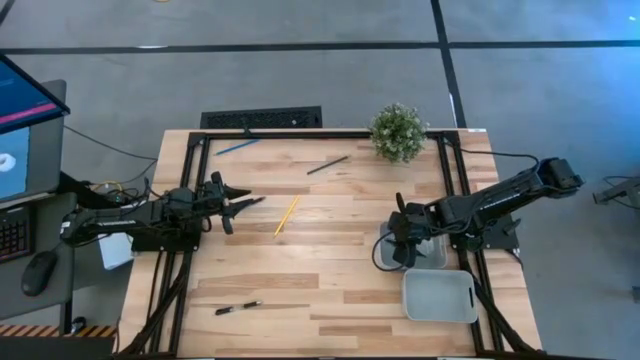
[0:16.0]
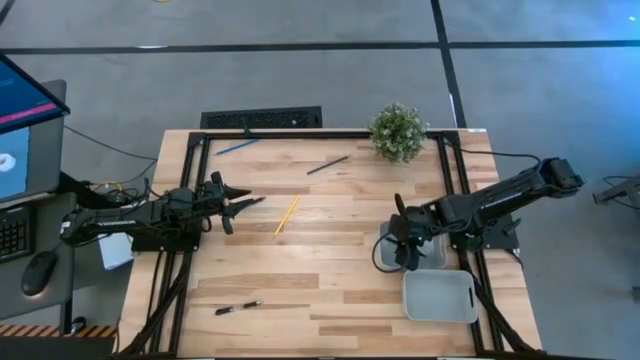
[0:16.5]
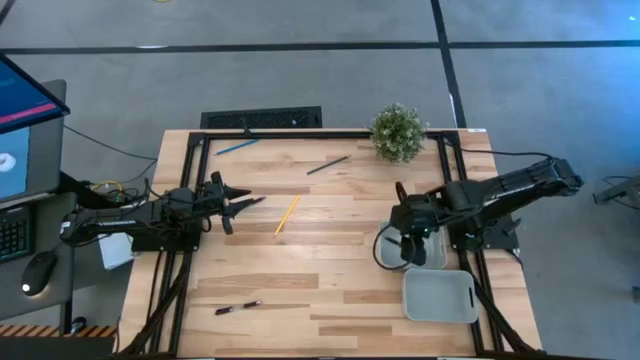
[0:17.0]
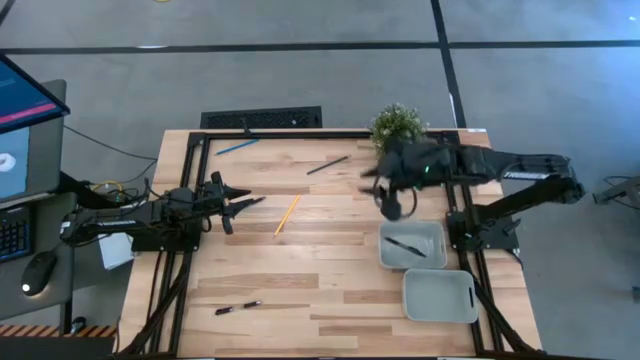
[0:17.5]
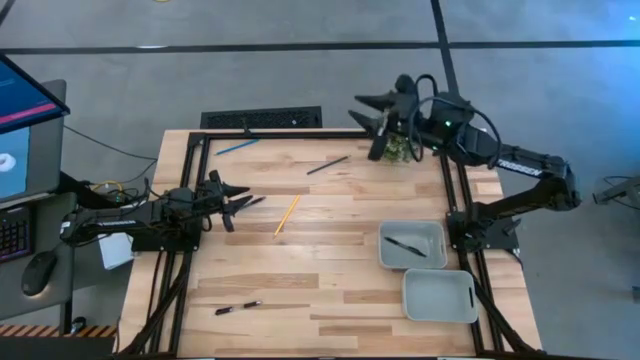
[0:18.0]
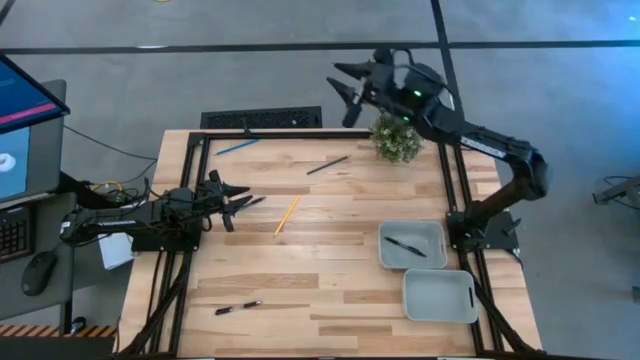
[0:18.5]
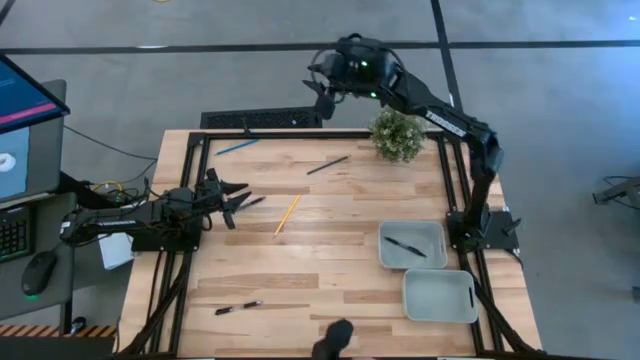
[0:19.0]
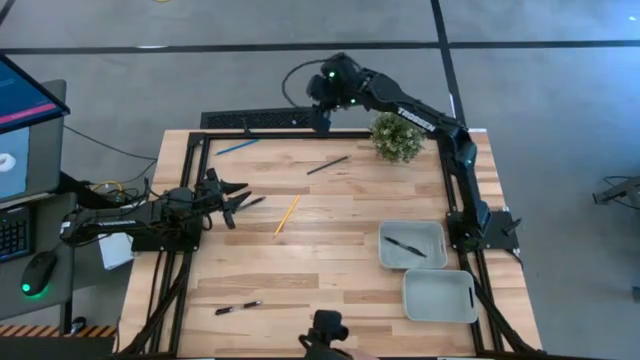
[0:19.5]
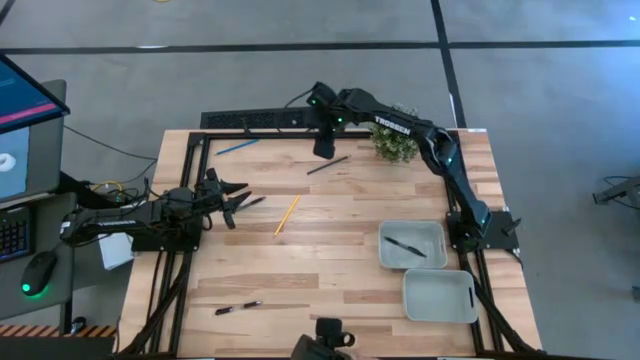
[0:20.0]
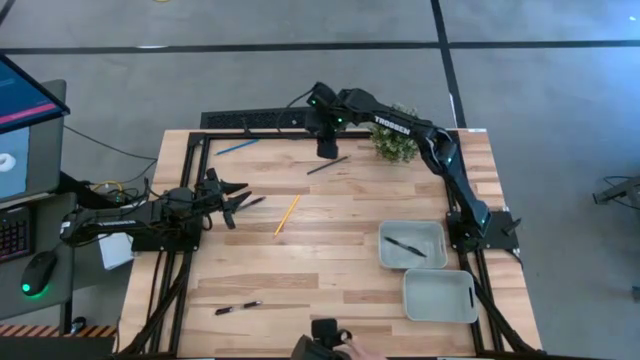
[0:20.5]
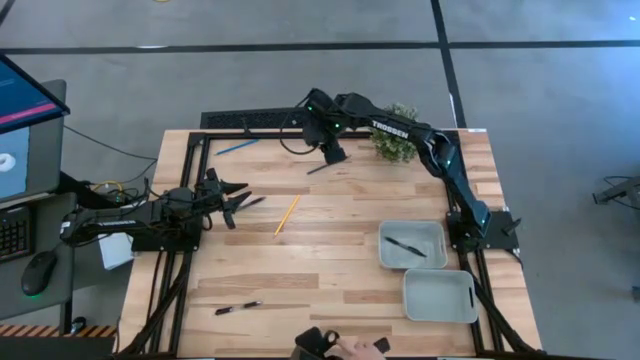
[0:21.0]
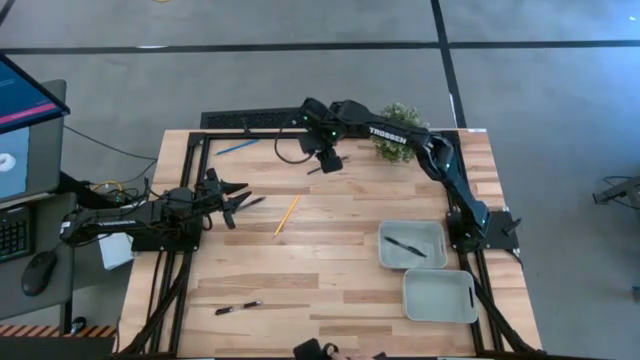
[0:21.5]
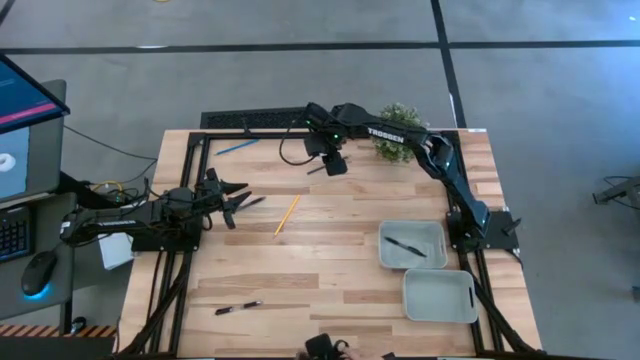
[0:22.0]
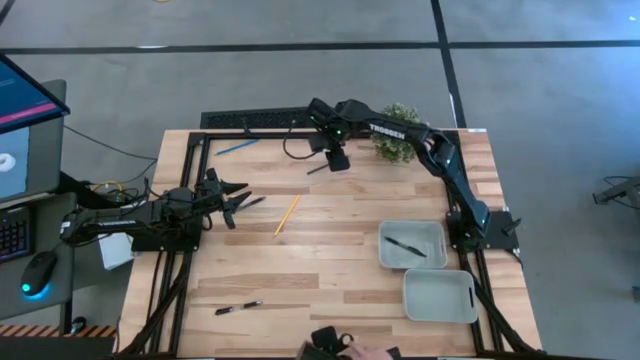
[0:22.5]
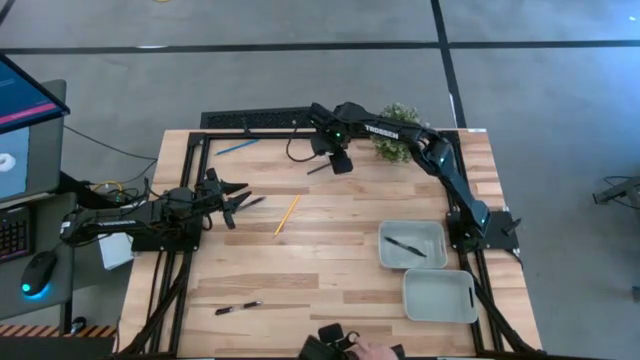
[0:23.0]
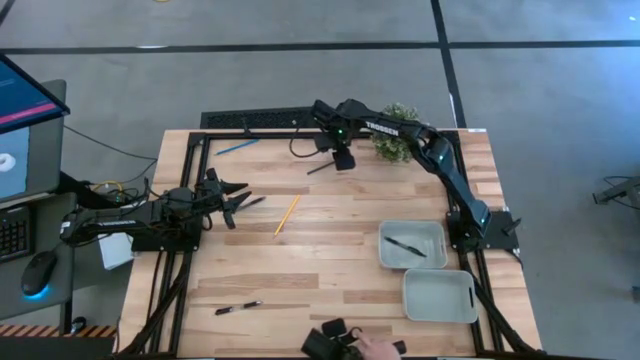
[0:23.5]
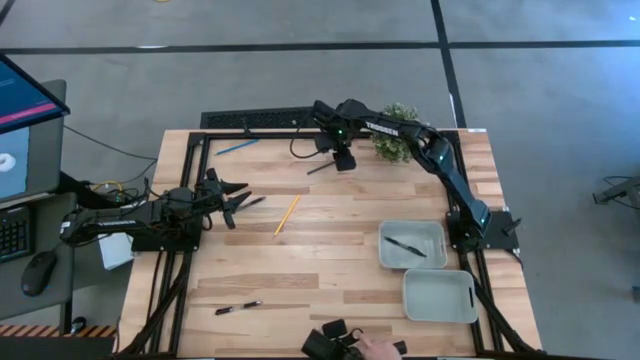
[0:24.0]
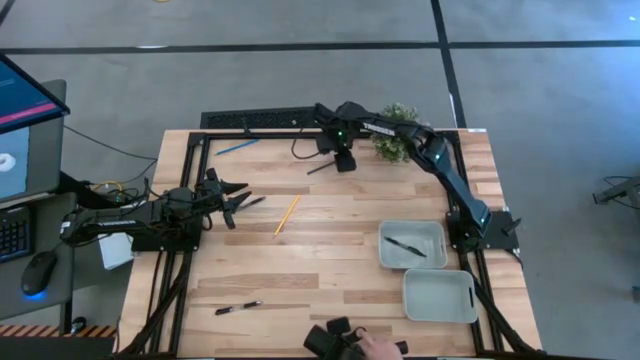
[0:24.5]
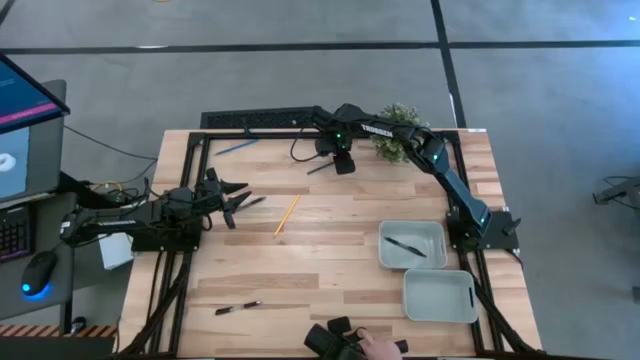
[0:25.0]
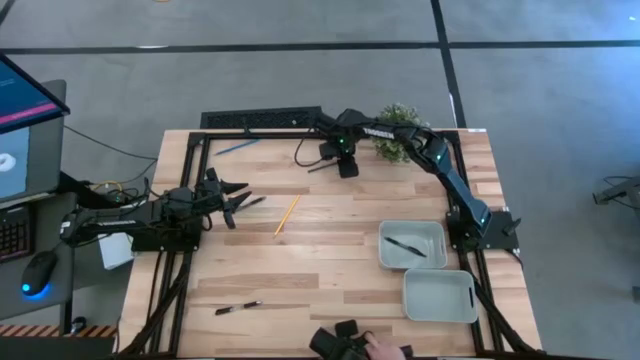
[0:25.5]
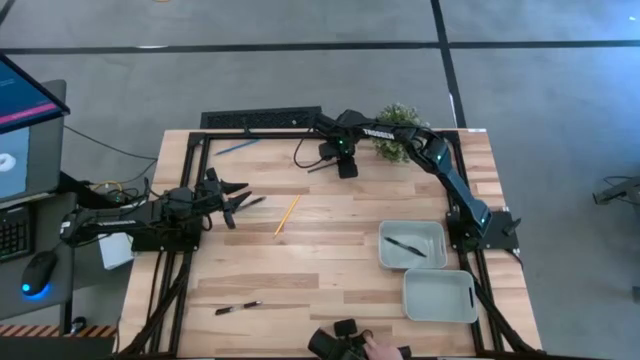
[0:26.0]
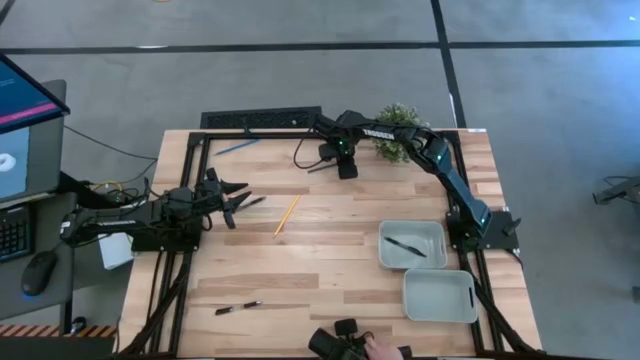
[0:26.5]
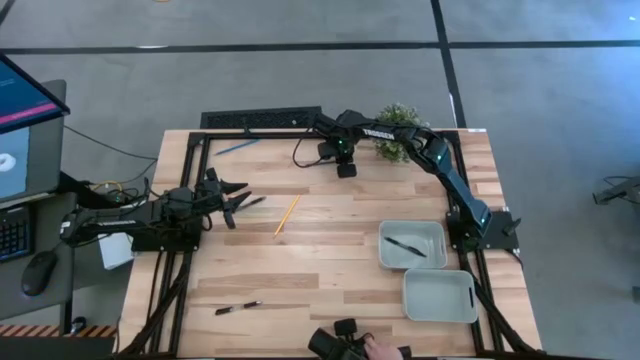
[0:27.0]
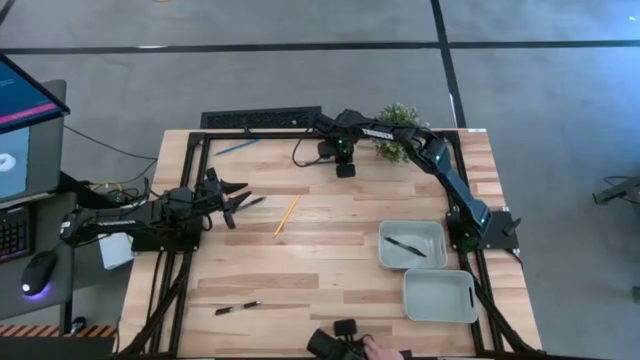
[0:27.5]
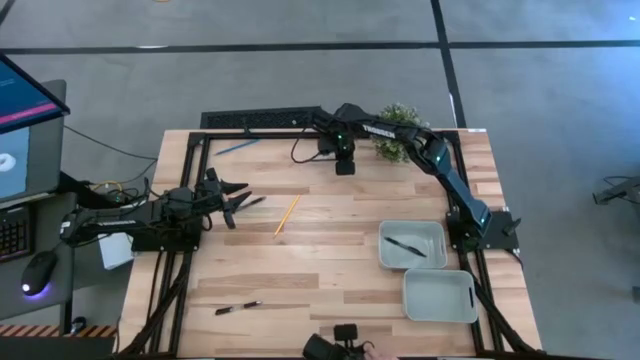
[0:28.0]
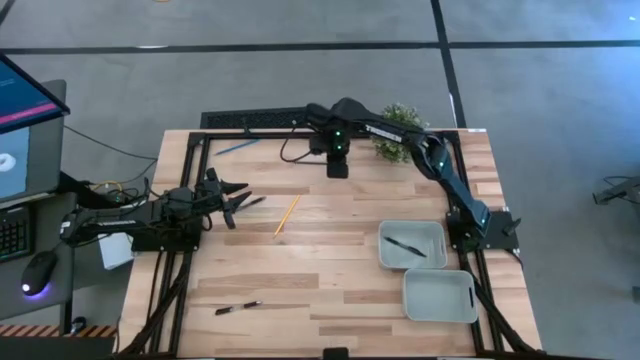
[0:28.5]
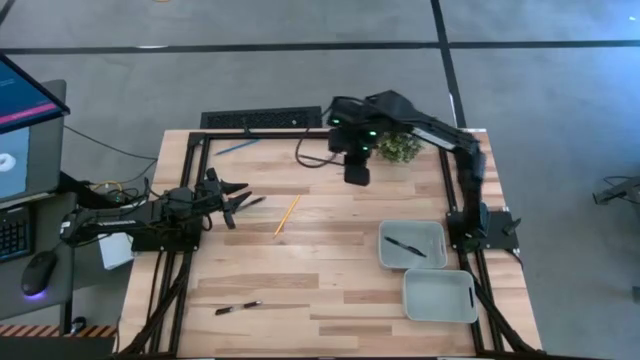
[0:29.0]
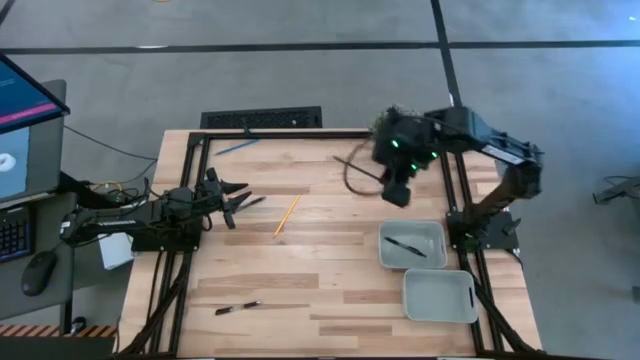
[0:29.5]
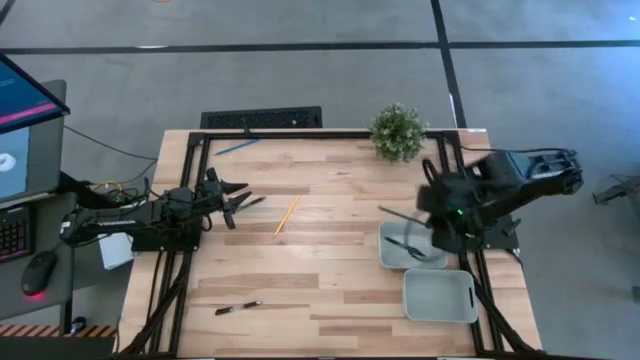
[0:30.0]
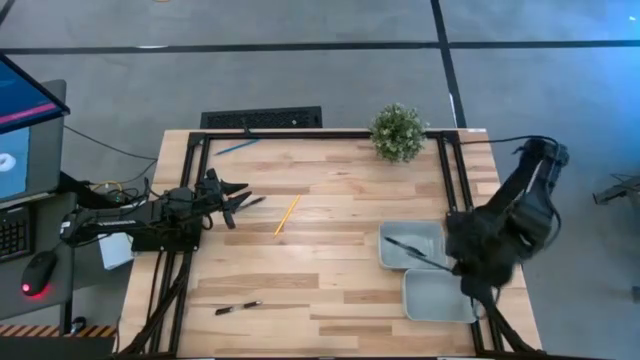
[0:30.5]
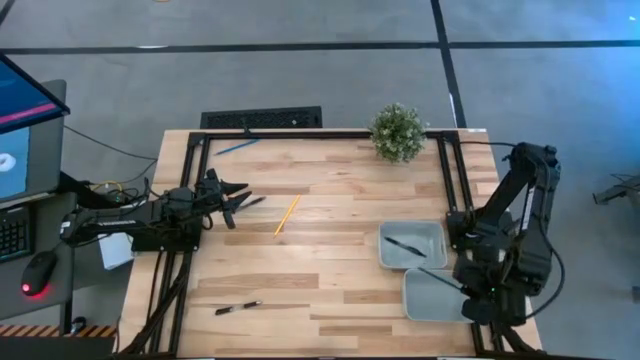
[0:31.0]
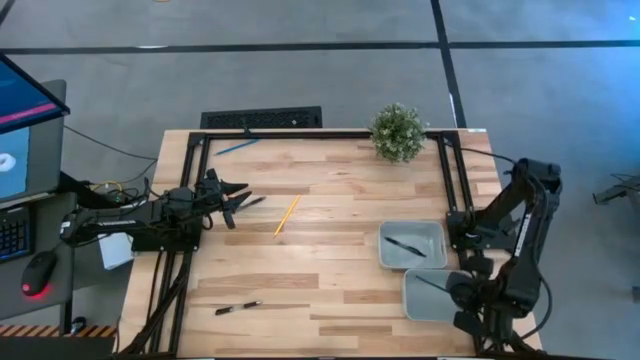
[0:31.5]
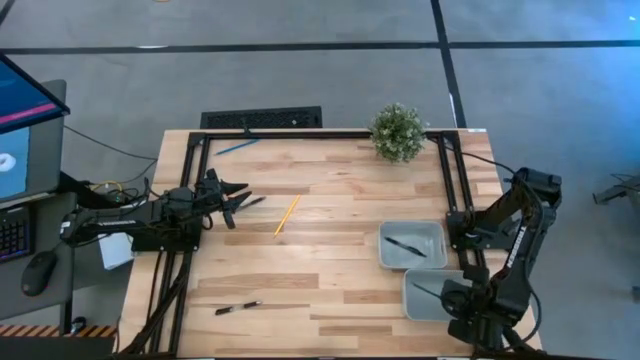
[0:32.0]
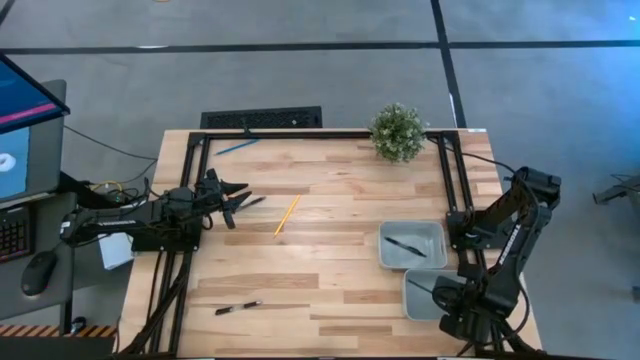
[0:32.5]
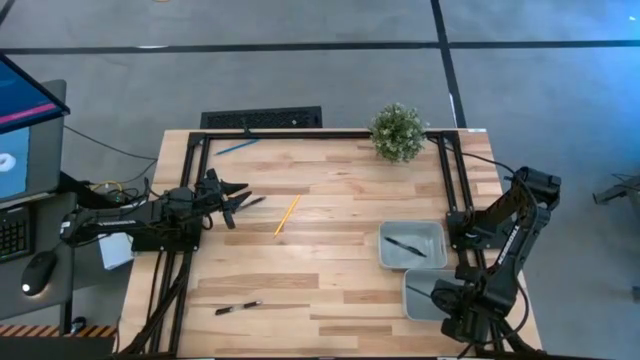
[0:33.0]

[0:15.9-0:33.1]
Task: Sort pens & pencils
Put the green pencil into the bottom gray bin

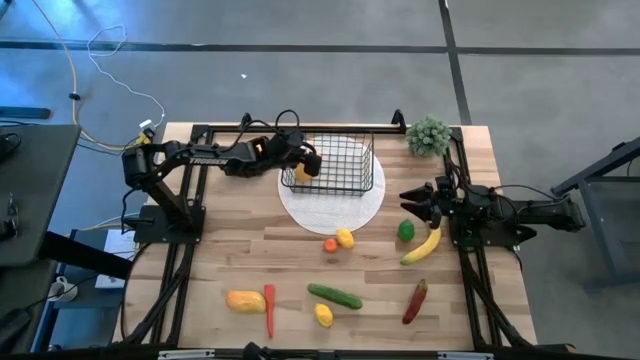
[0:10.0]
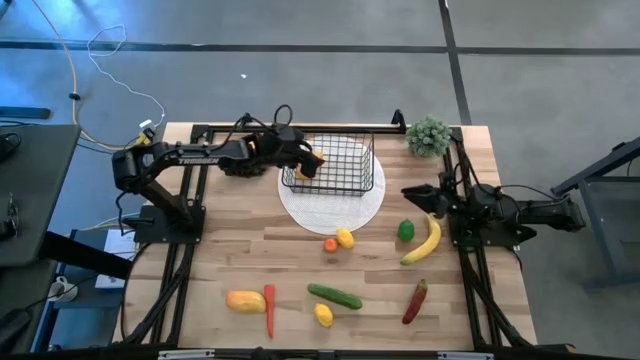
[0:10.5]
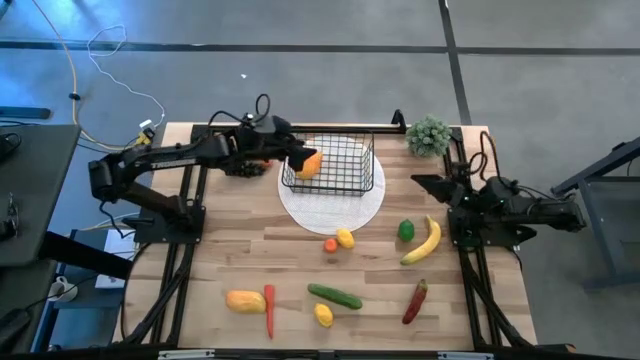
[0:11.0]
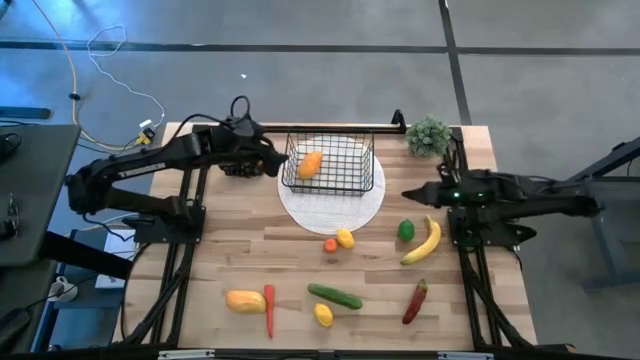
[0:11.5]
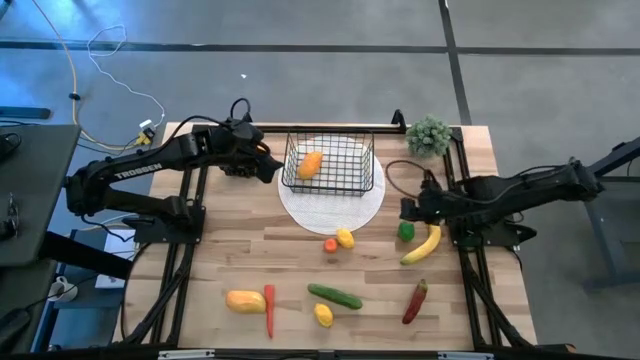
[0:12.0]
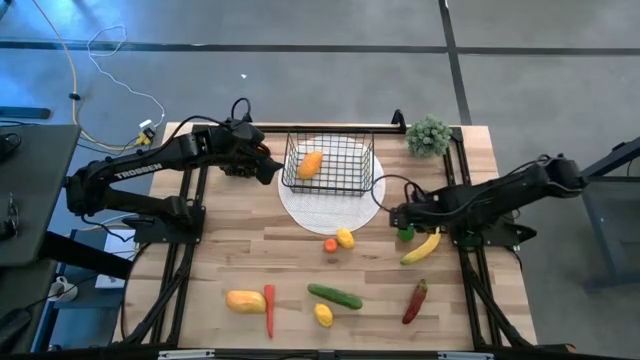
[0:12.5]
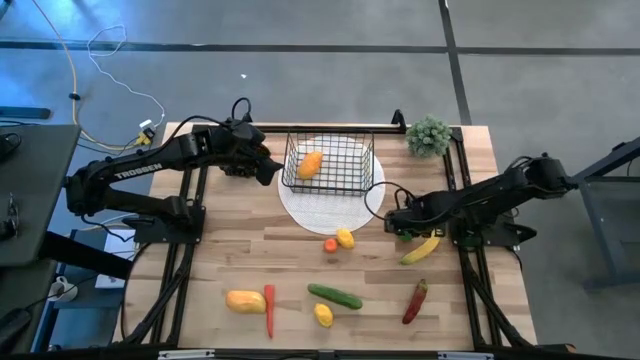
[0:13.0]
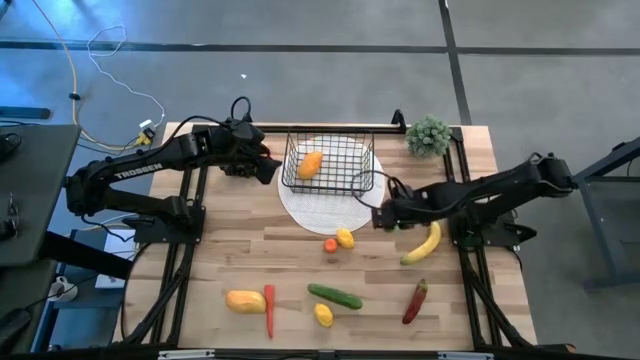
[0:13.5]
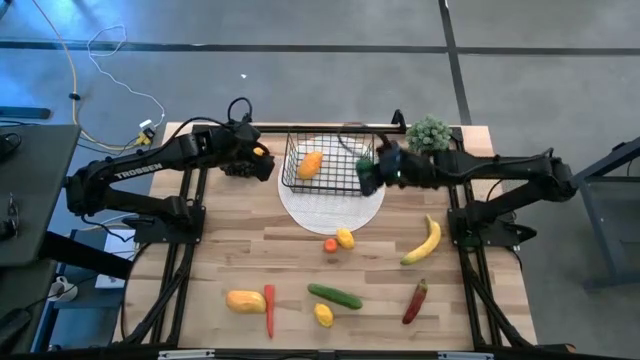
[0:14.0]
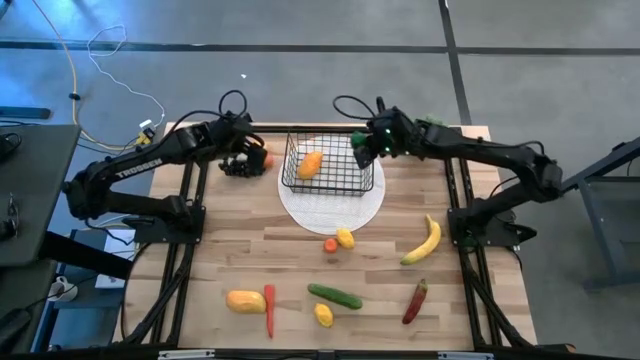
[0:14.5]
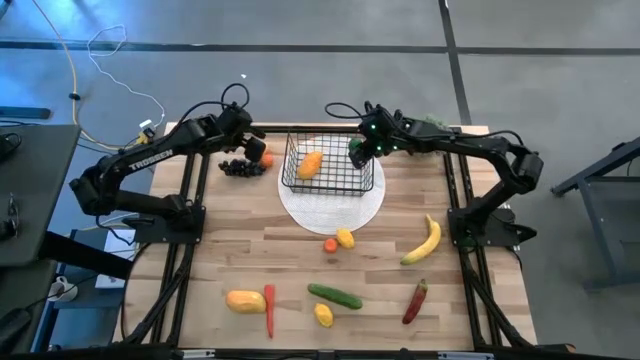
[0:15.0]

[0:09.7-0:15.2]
Task: Build produce basket
Put the green lime into the wire basket
